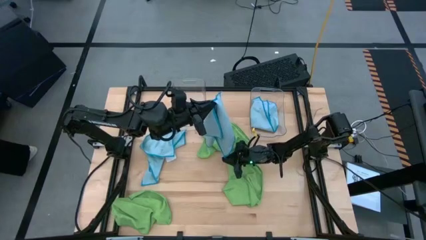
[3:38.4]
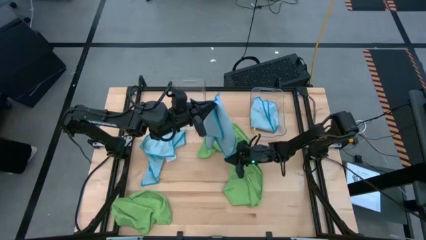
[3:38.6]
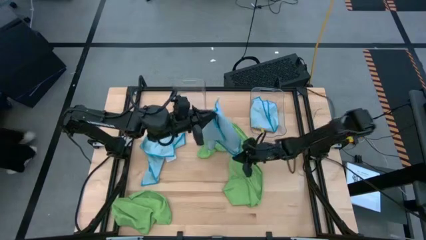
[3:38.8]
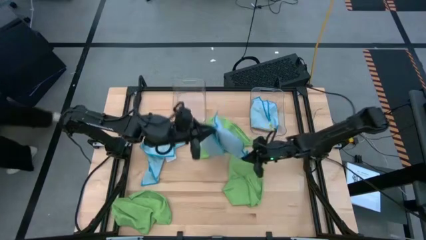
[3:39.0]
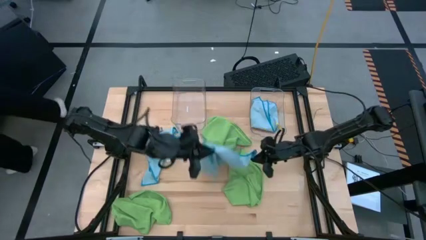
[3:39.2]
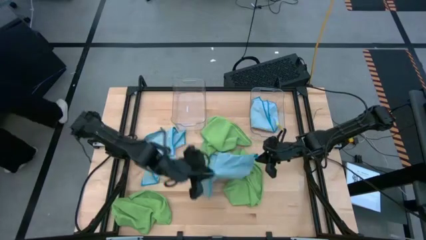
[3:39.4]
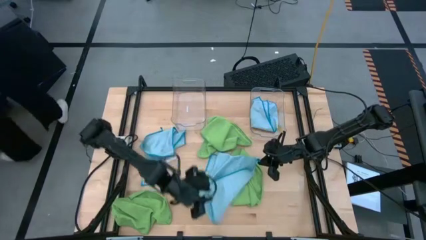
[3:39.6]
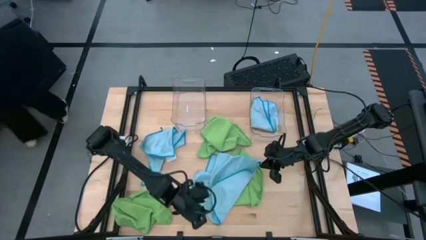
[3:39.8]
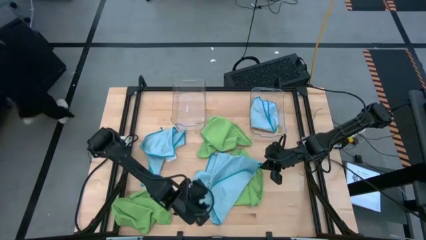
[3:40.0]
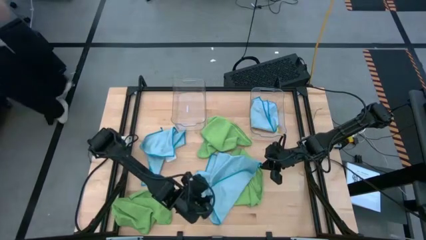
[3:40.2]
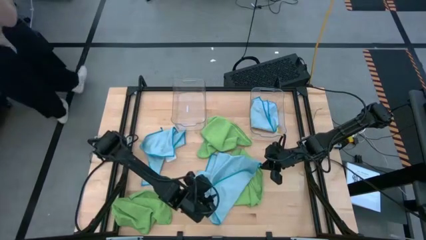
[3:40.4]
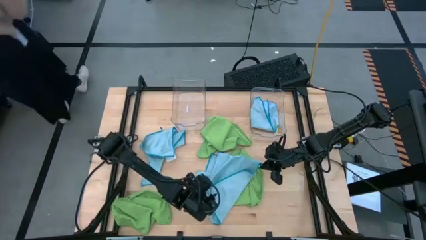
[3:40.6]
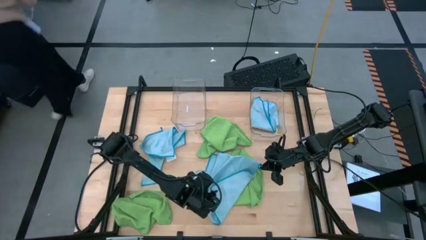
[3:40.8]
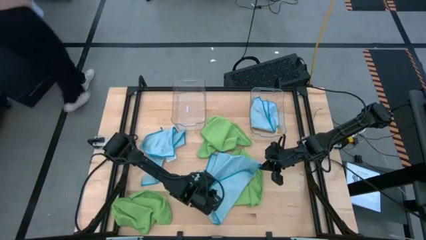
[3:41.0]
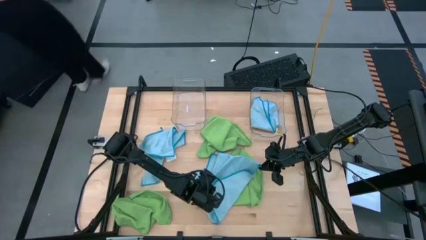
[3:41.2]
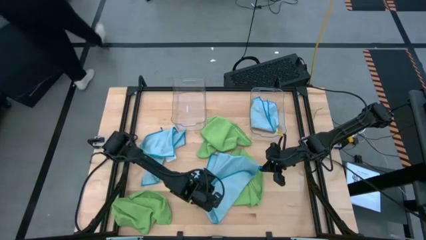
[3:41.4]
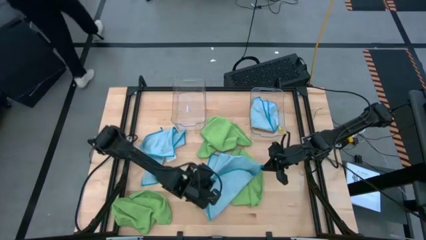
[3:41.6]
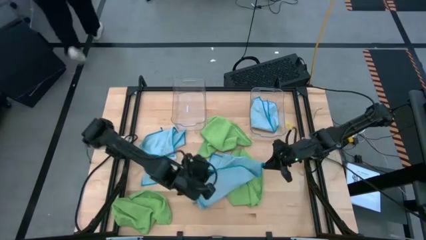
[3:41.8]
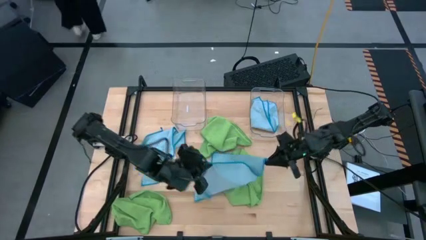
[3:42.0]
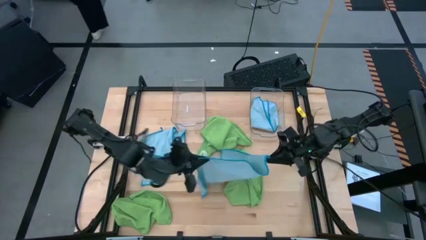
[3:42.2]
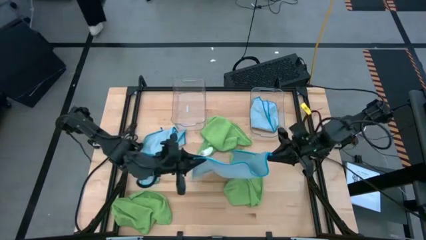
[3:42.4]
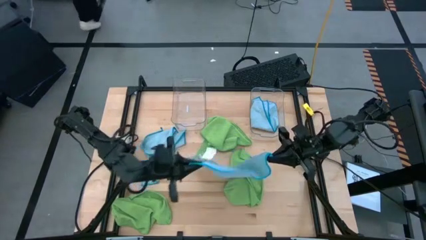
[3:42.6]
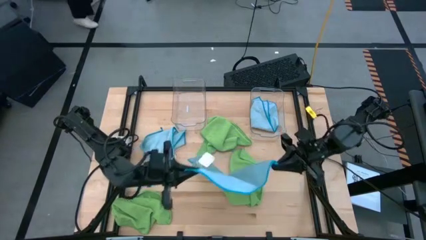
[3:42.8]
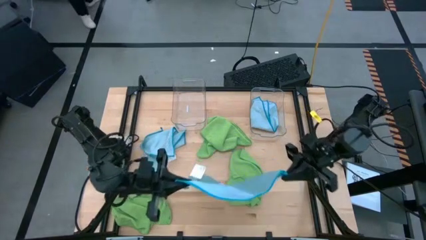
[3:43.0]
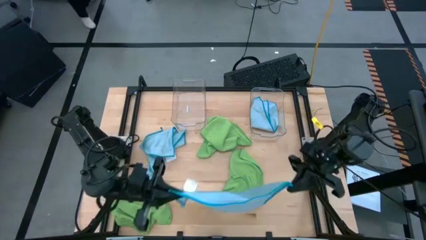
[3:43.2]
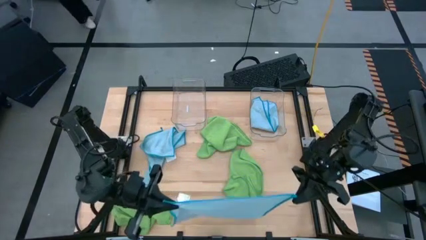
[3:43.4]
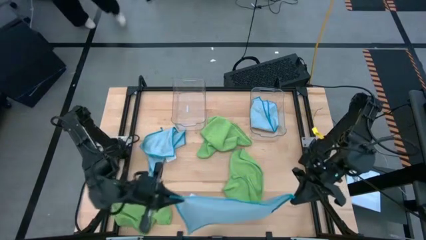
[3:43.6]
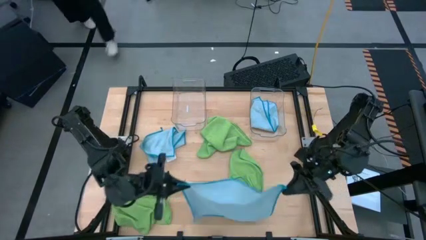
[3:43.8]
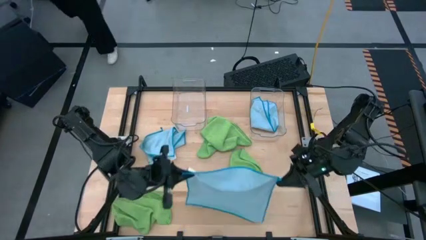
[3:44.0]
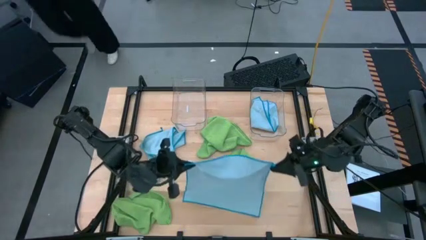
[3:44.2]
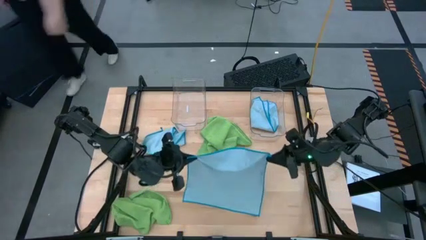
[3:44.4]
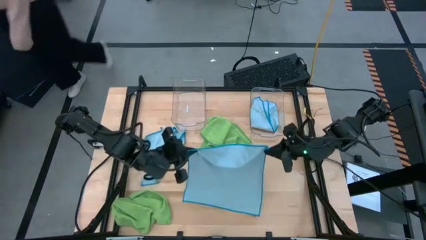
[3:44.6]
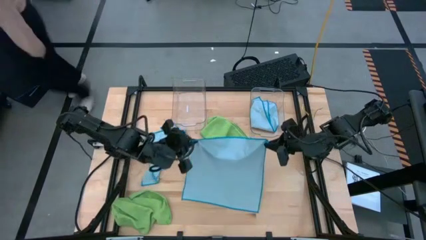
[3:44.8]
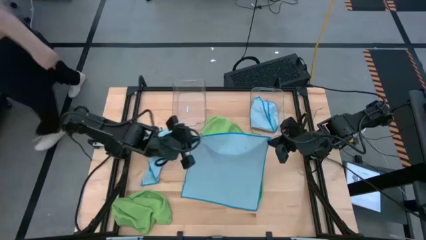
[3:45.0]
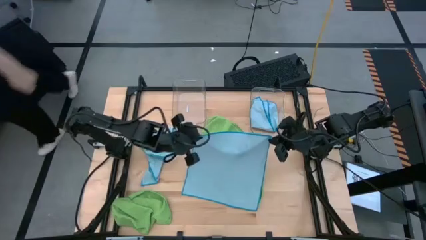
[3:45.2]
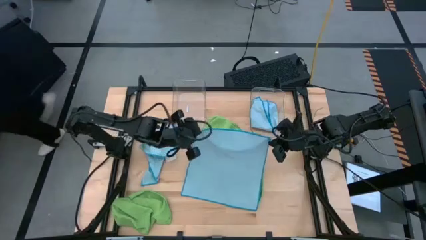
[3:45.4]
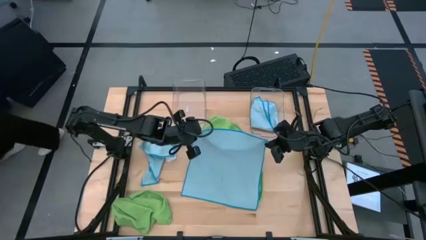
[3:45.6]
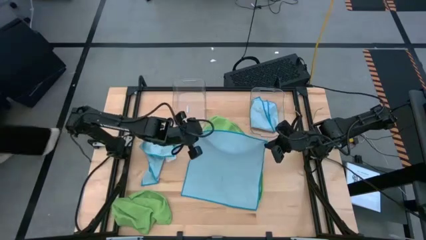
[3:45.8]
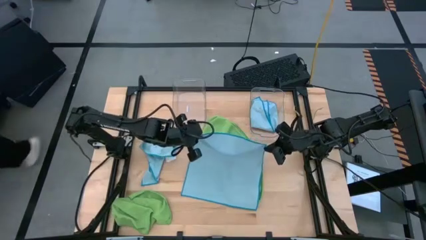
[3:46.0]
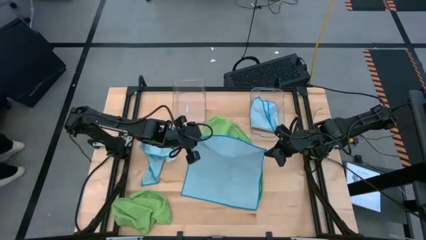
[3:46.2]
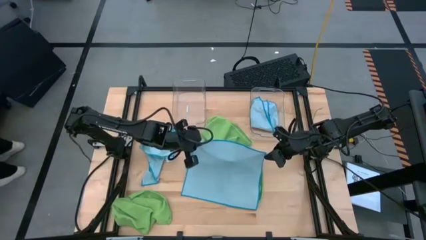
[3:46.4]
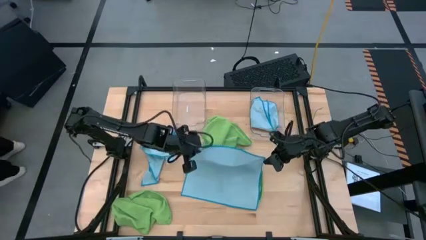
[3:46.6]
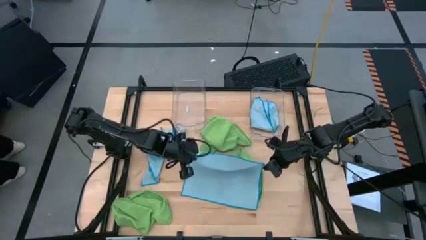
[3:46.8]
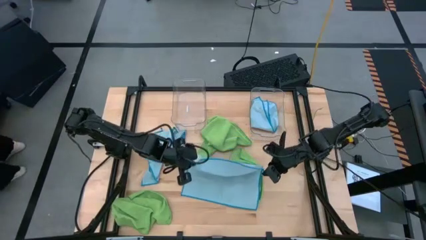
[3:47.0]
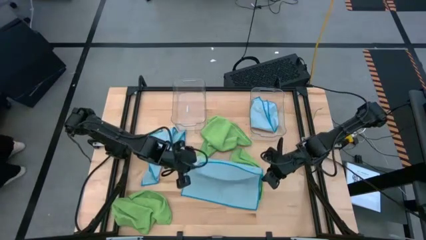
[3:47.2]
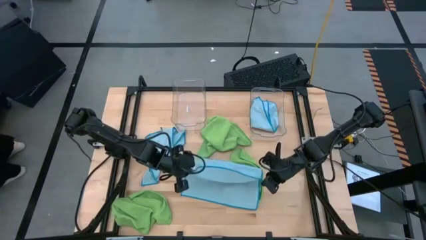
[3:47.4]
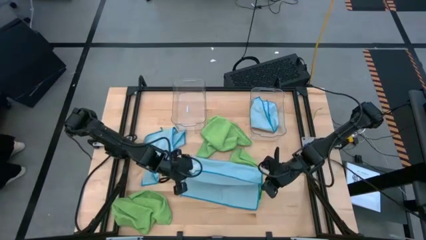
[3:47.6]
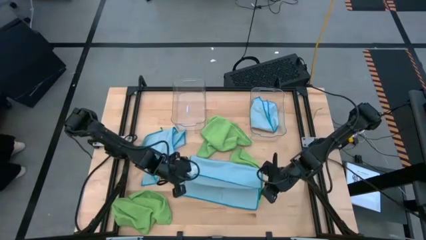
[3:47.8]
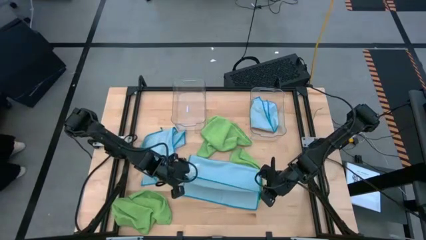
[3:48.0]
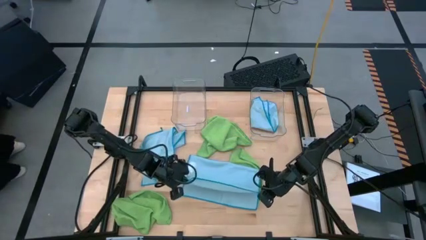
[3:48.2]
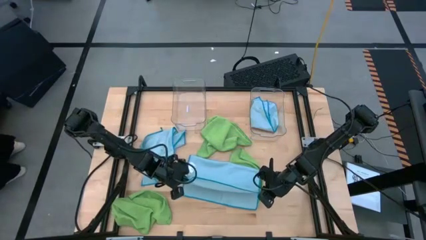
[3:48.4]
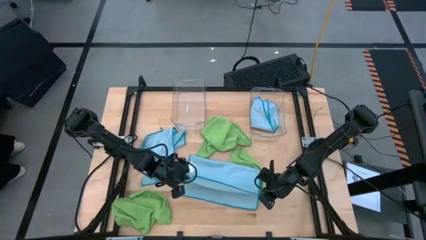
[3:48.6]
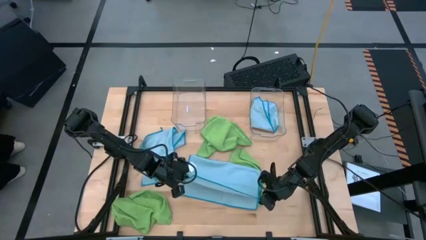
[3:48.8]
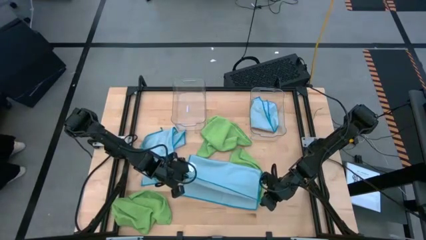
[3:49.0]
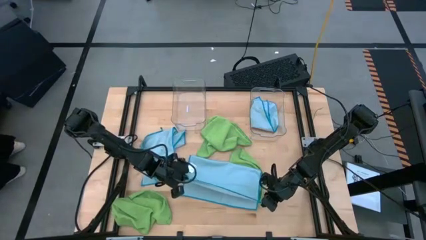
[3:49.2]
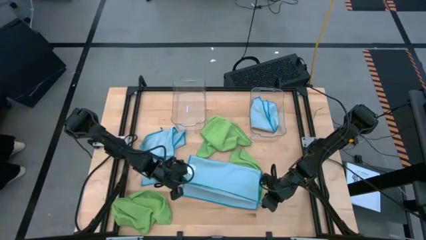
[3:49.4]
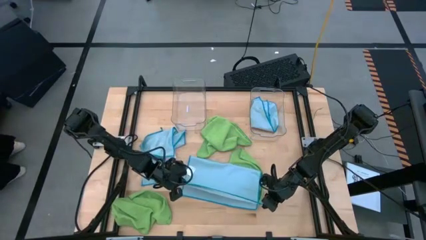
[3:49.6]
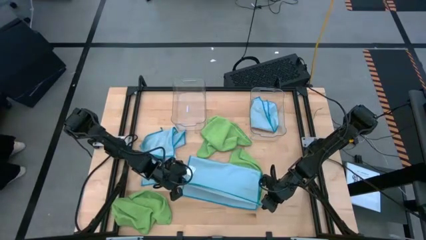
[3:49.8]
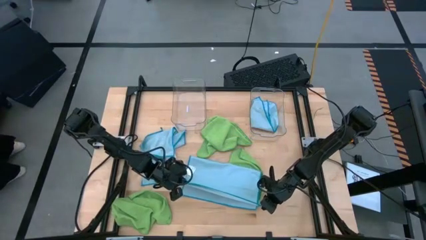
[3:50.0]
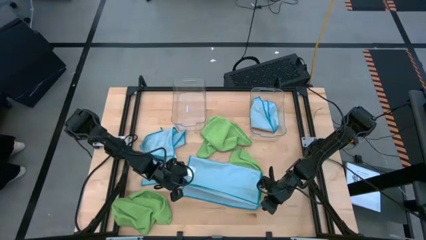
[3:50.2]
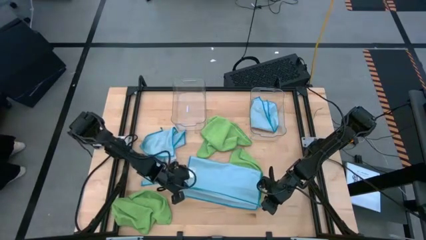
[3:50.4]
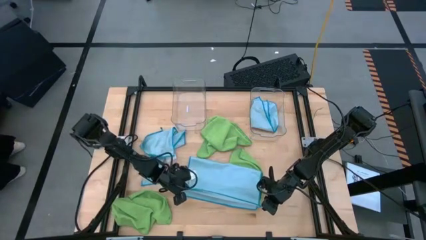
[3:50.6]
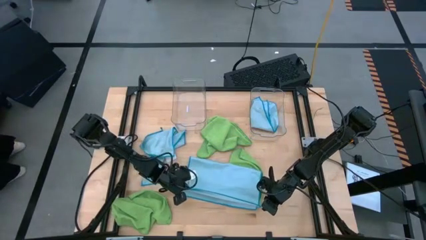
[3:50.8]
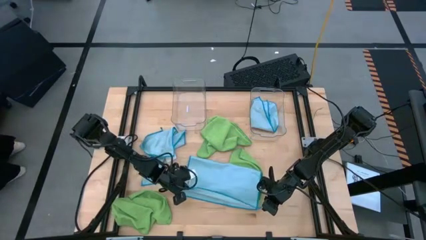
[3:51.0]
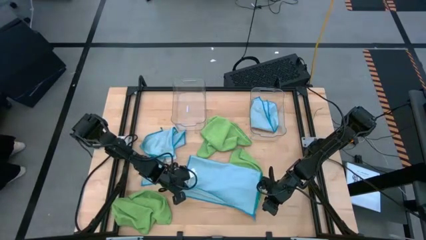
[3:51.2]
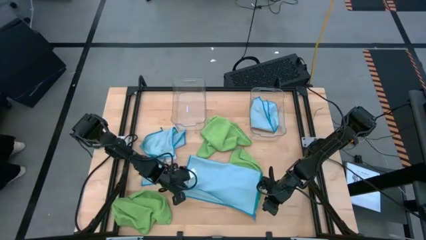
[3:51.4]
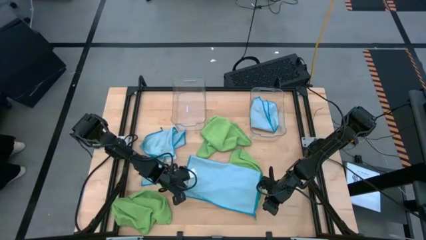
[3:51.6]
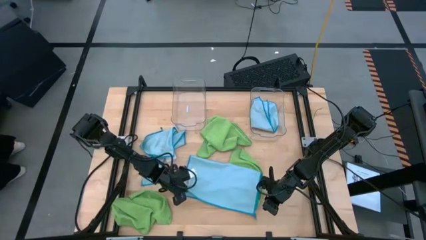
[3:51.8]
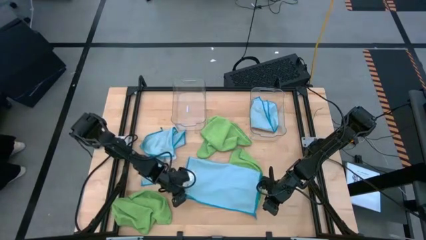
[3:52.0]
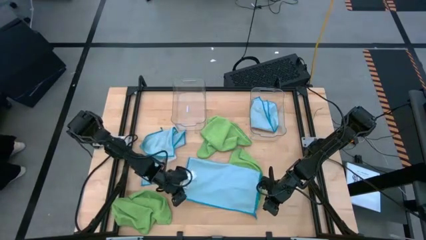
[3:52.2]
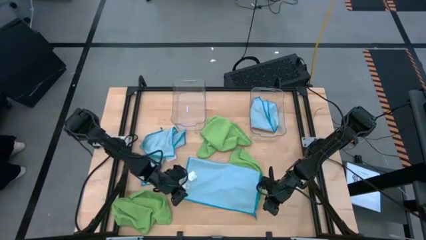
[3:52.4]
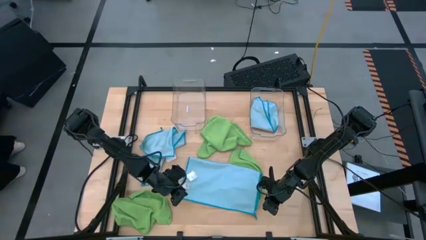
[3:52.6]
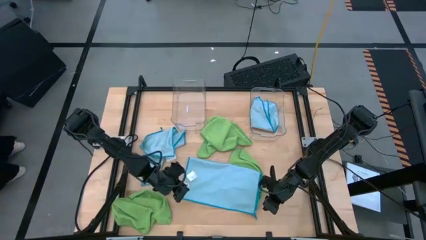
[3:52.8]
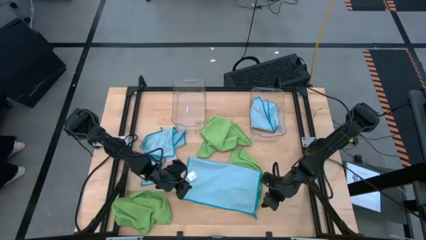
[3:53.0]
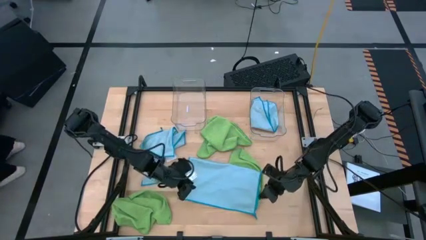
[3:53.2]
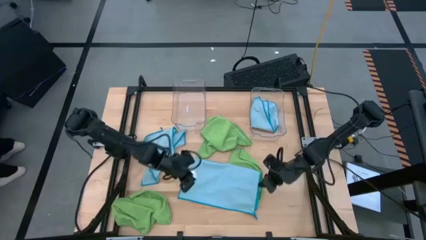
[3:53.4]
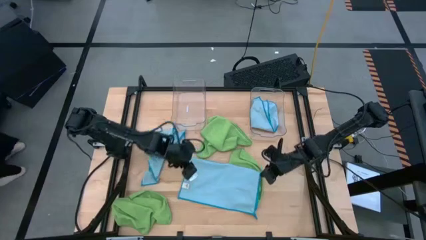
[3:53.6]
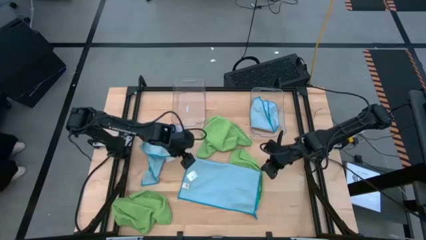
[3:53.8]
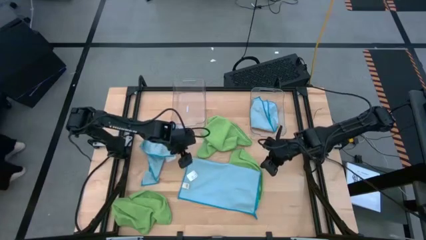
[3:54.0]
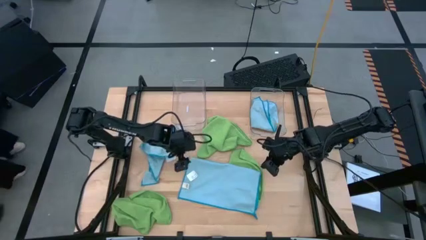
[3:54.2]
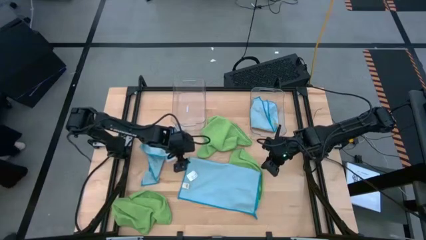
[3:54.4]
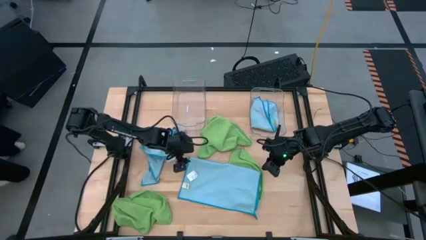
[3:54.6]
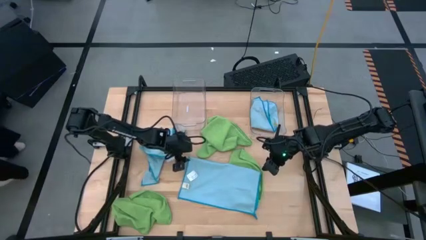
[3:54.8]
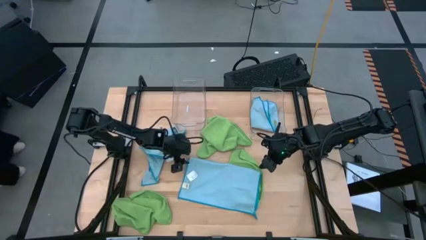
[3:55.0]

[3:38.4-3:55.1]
Task: Fold microfiber towels
Fold the right blue microfiber towel
